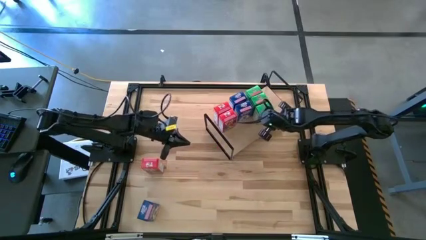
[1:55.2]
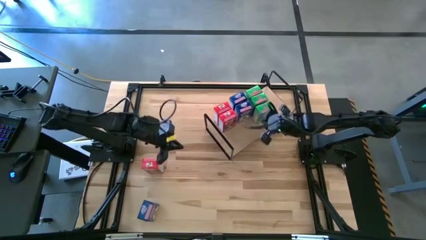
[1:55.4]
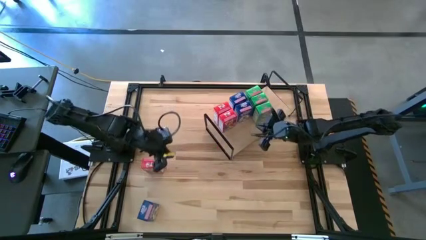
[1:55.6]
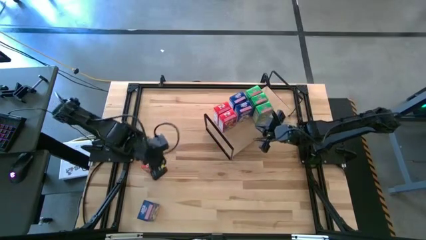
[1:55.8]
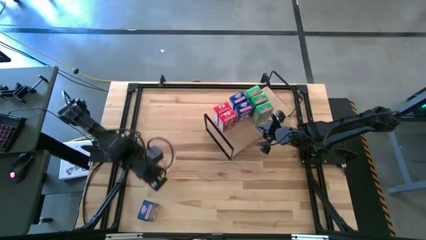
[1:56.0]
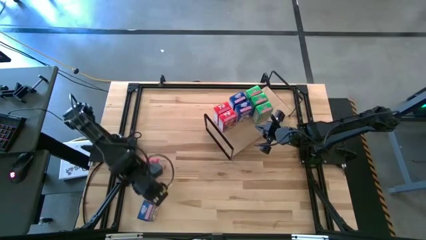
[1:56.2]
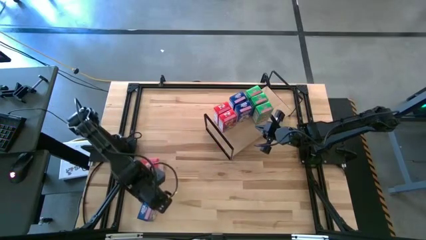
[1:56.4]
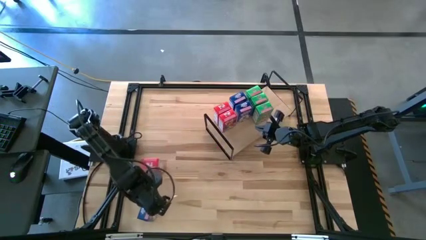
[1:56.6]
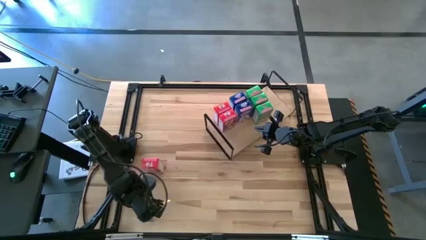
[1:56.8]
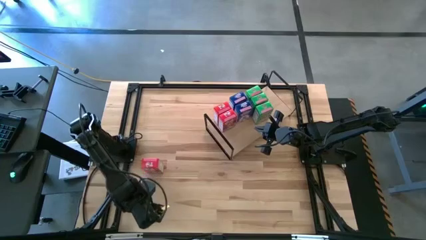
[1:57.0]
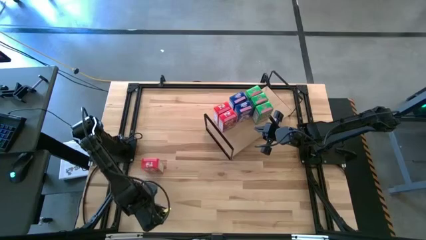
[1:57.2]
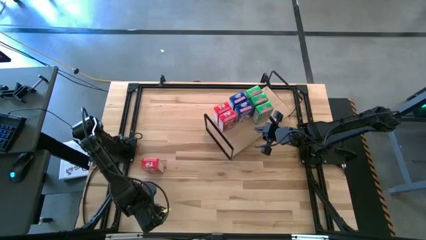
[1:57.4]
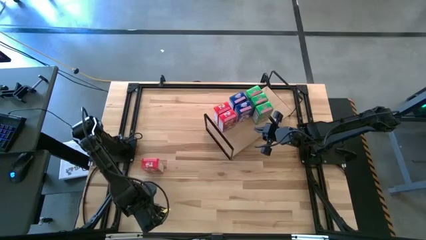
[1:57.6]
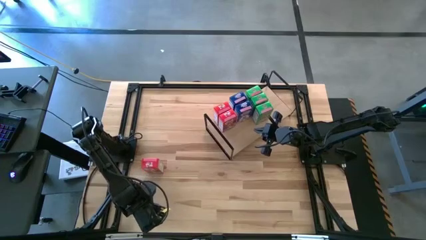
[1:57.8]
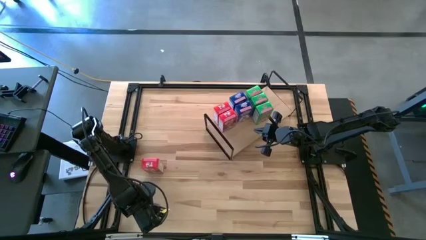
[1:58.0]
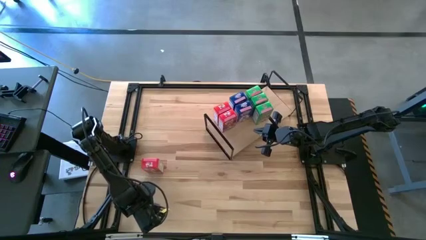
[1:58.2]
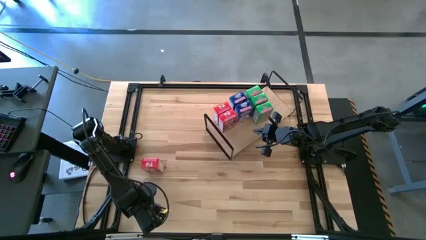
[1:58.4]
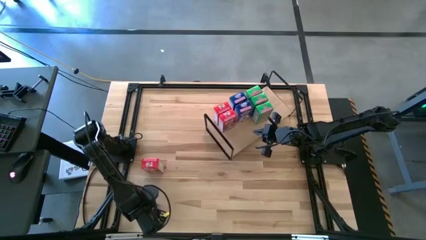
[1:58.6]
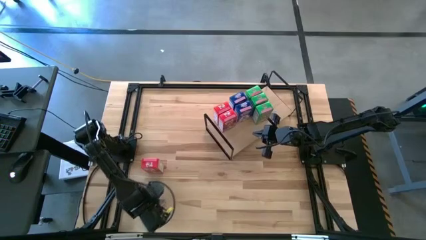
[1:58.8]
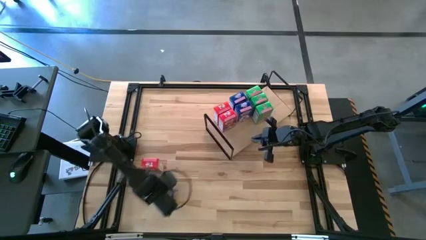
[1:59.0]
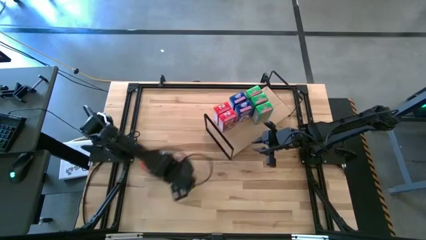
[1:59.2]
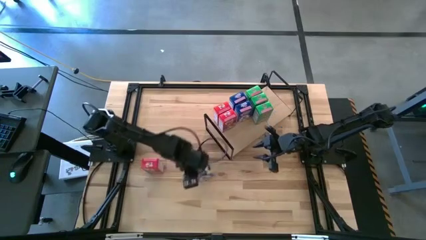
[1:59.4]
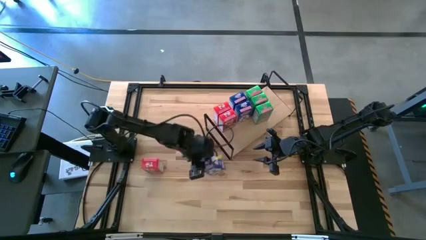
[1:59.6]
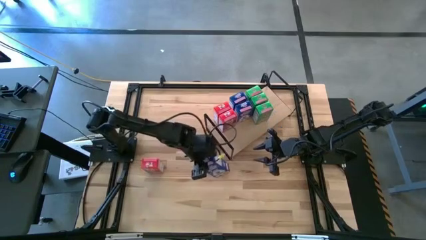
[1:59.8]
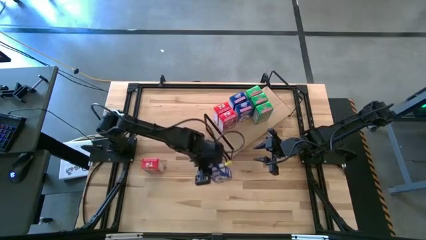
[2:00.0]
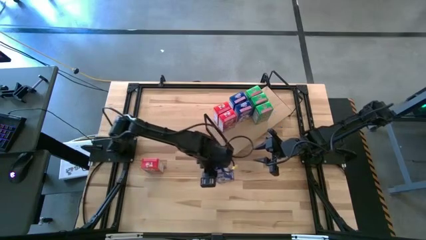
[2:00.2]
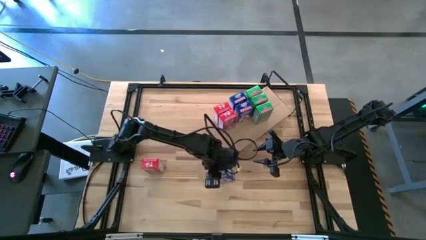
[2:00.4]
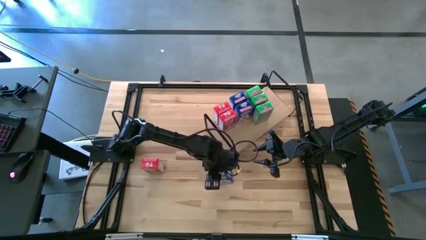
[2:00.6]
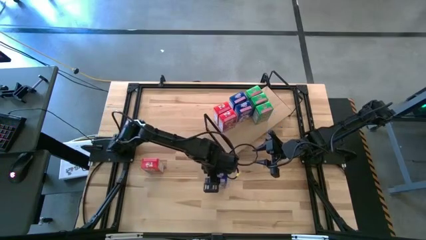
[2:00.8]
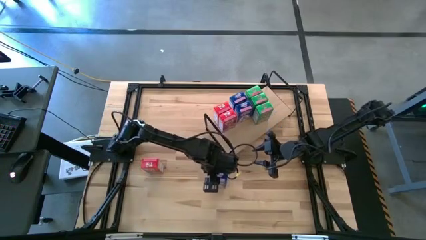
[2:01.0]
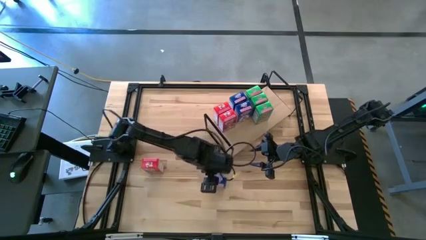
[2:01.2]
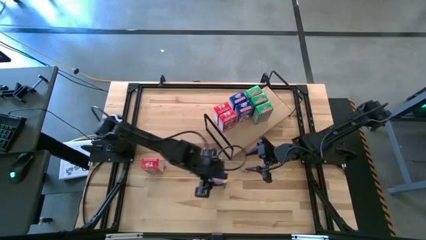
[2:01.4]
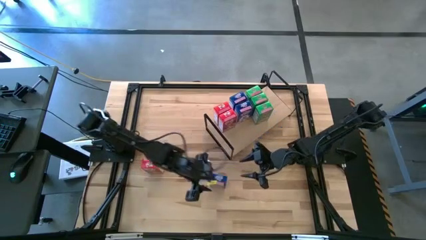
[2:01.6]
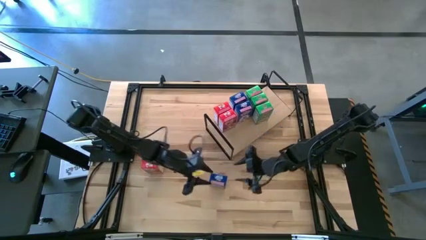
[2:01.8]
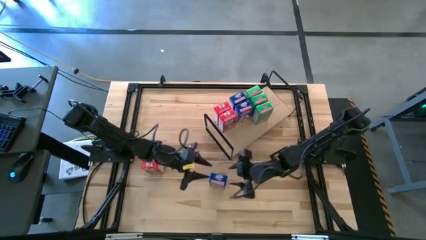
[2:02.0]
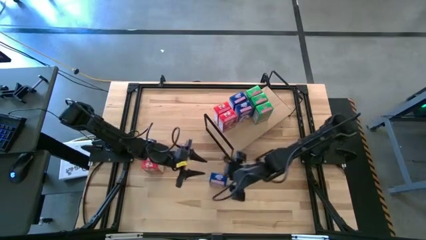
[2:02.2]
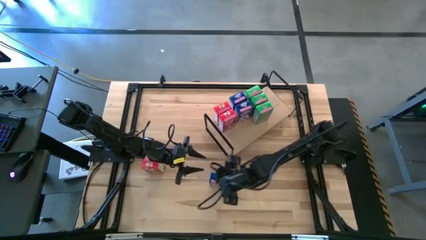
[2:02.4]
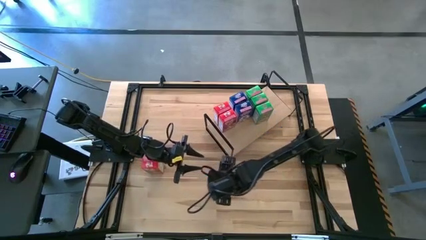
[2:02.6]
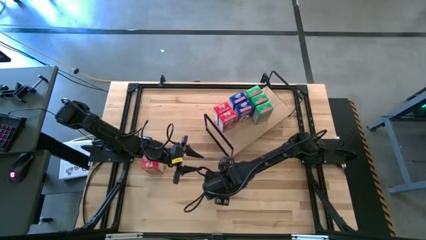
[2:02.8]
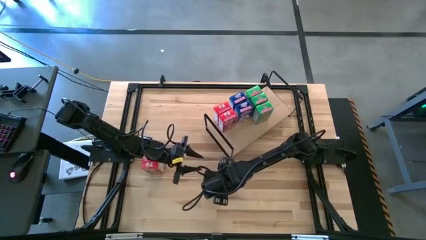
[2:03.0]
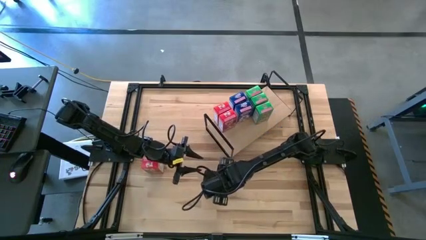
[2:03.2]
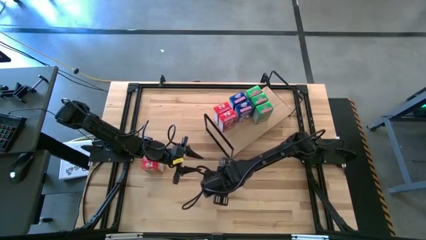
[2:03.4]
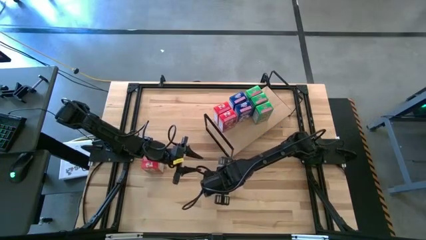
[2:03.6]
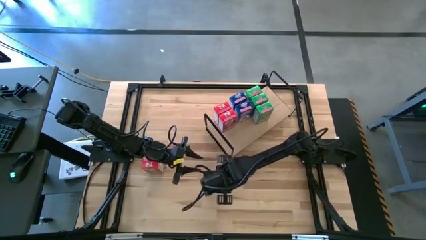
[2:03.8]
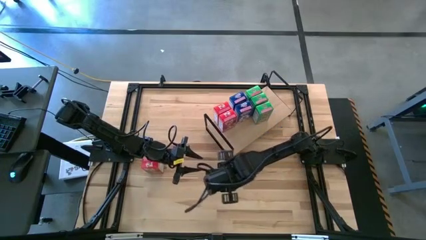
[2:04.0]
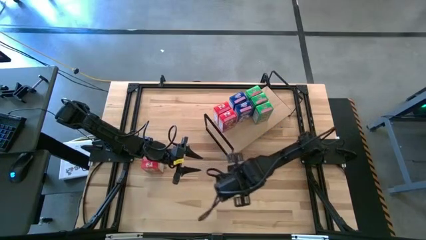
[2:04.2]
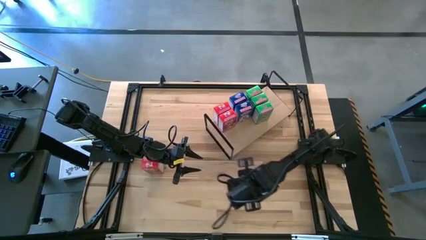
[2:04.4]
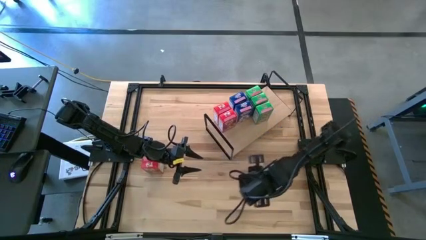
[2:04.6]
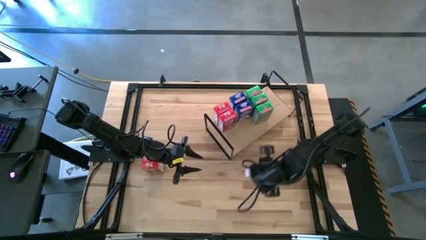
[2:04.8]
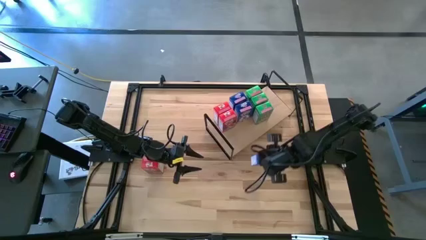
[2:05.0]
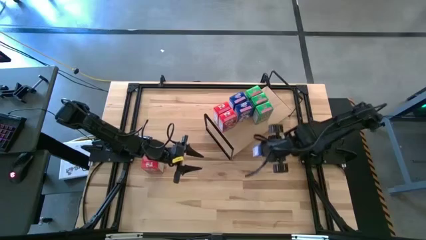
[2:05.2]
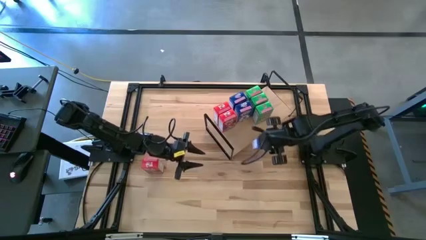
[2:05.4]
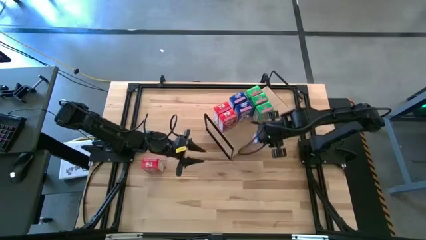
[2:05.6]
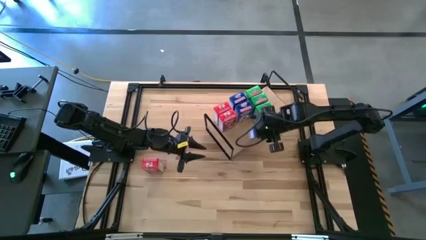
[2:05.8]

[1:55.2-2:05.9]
Task: Stack cereal on shelf
Put the blue cereal box on the shelf aligned with the other blue cereal boxes

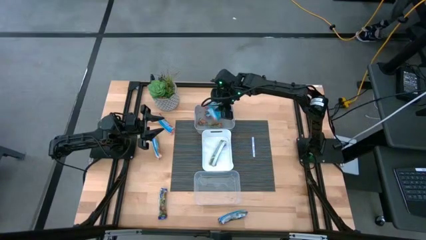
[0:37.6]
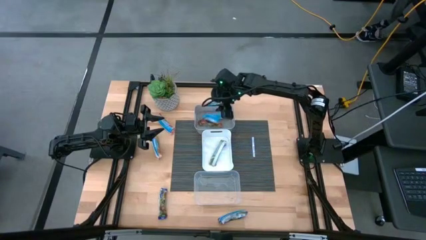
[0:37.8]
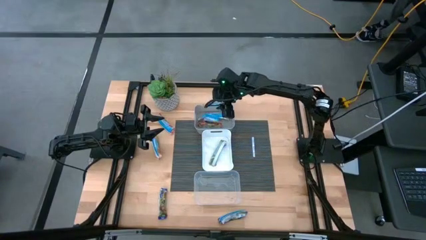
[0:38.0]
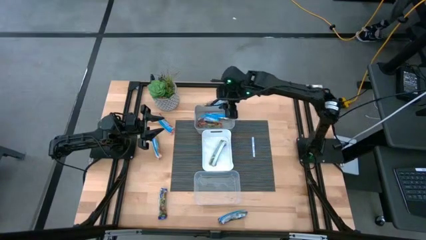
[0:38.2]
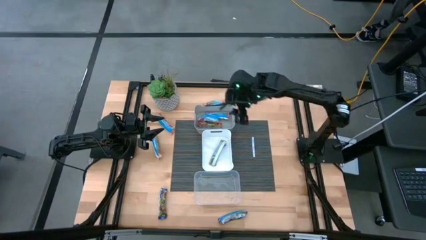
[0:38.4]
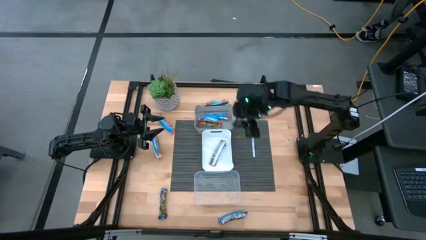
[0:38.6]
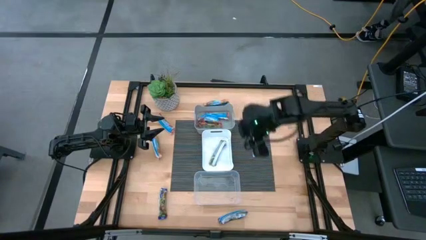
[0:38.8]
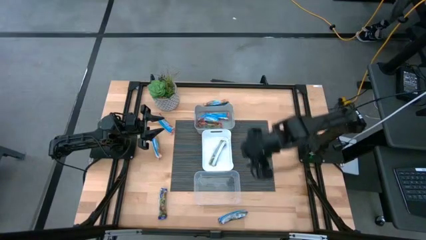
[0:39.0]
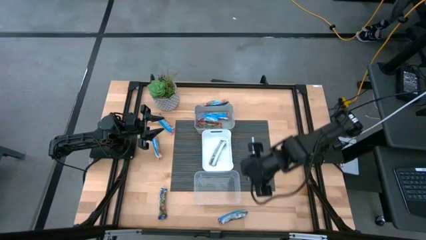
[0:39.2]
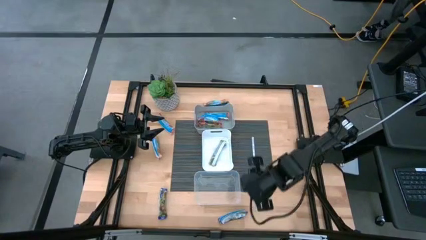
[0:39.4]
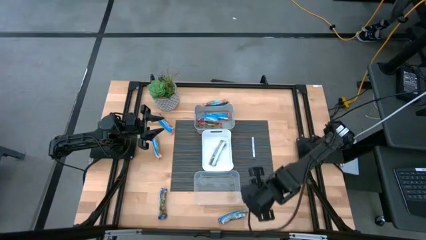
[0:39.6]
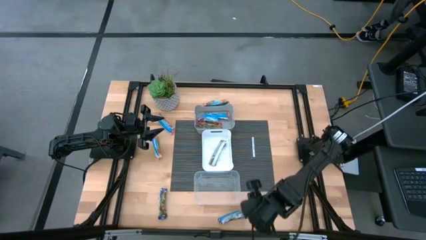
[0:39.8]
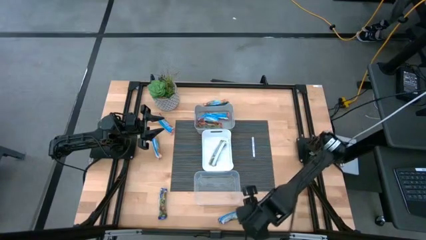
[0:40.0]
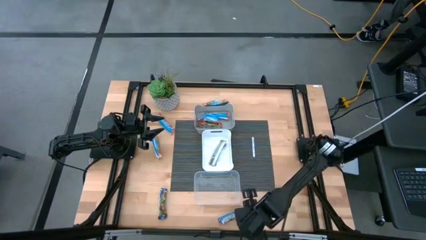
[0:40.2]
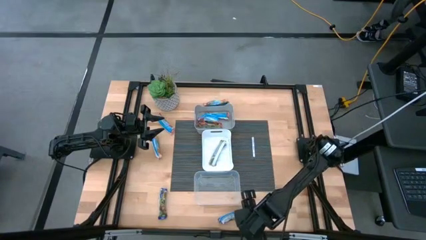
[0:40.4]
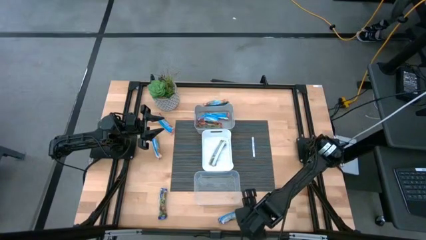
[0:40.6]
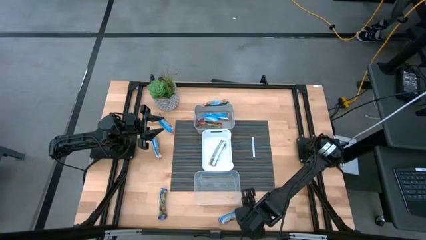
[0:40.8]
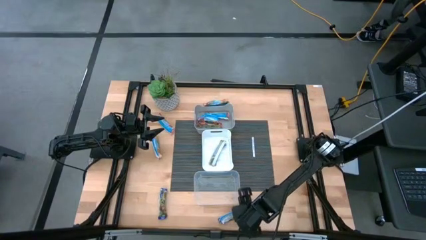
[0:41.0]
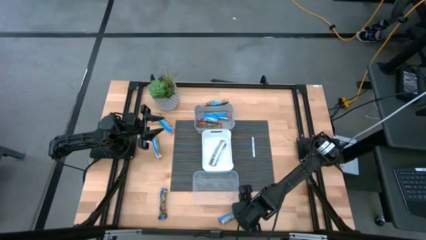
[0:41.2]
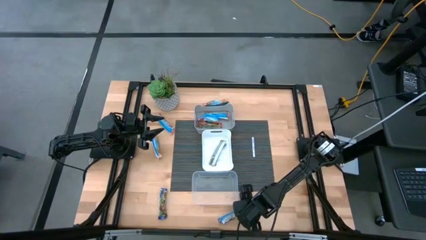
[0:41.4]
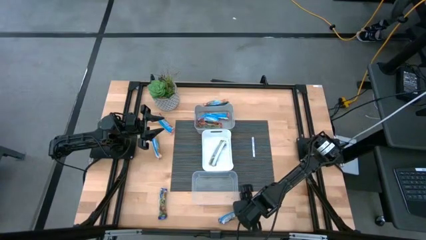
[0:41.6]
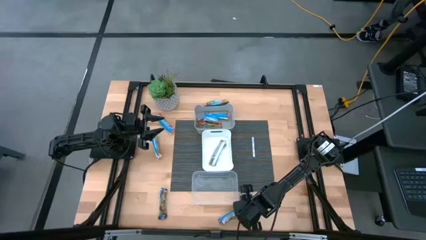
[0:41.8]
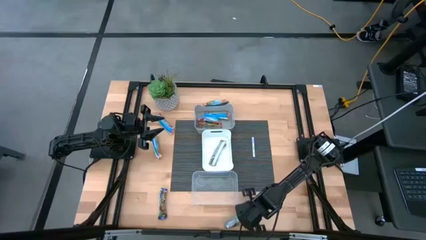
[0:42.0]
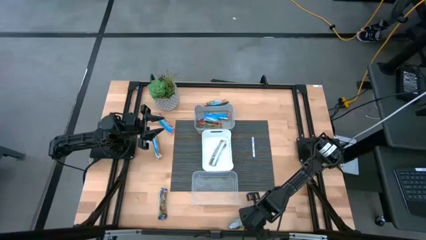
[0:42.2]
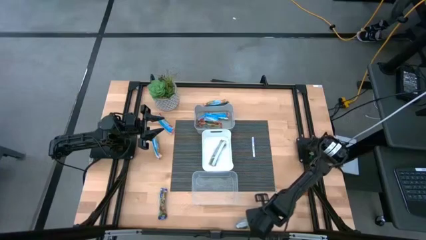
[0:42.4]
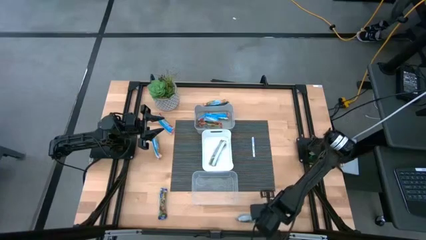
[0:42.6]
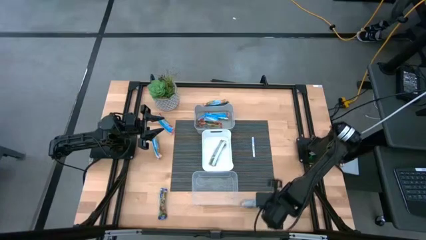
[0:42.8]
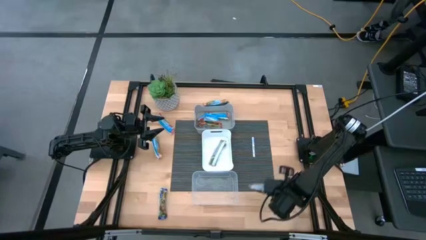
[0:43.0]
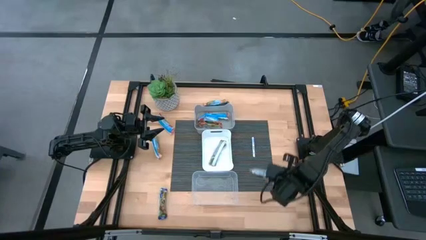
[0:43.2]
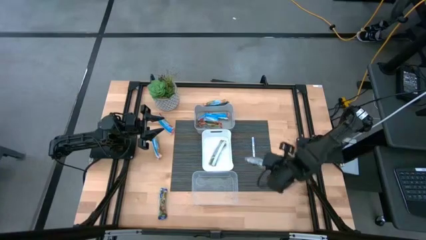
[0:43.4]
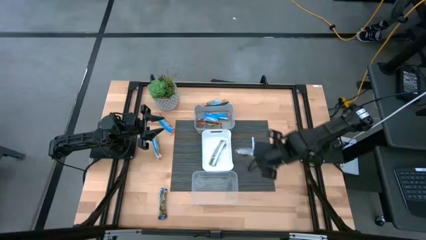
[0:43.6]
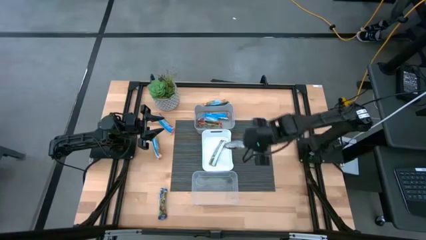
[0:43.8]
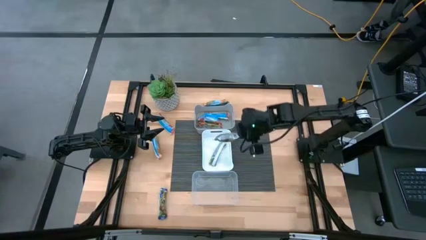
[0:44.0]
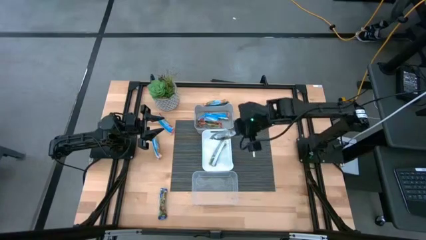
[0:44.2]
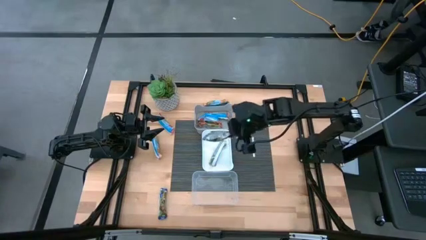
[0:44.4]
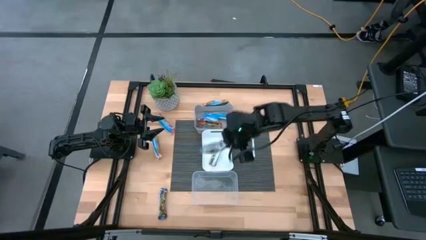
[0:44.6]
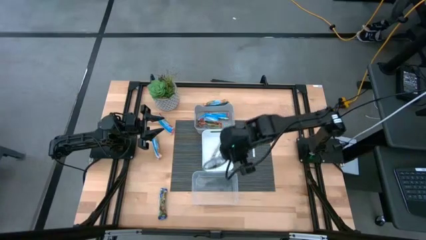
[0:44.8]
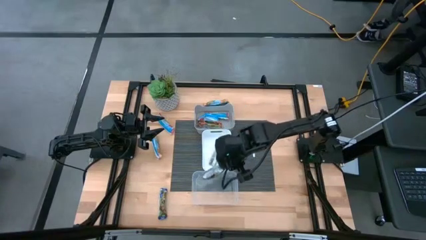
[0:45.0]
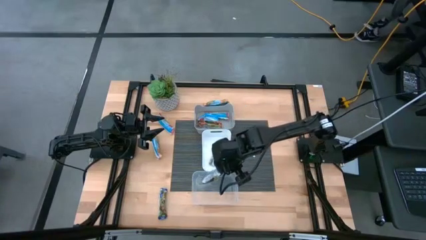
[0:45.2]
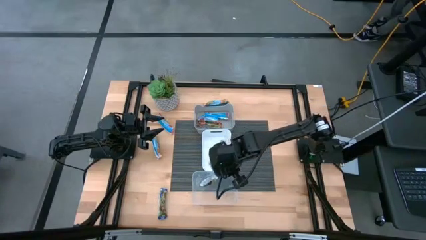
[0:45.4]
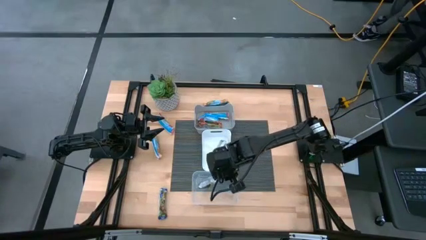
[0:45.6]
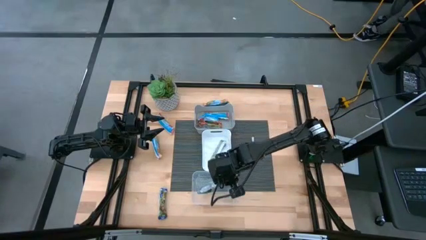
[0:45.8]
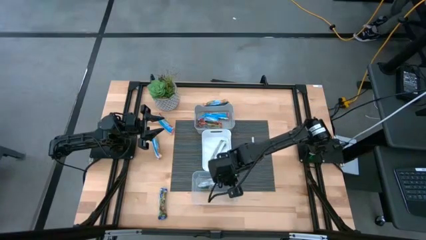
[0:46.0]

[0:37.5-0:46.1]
Task: Pick and place Granola Bars by type
Put the right blue granola bar into the transparent bin
